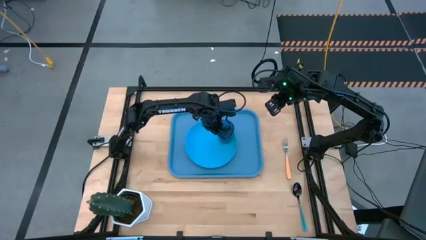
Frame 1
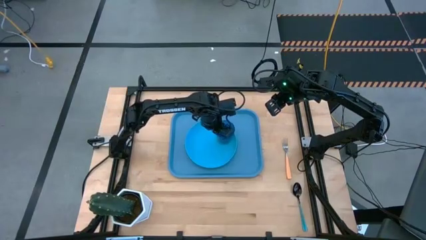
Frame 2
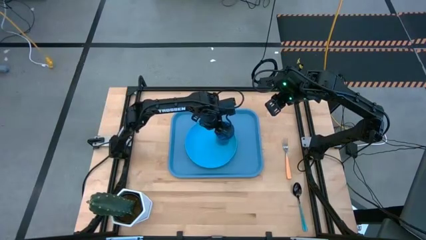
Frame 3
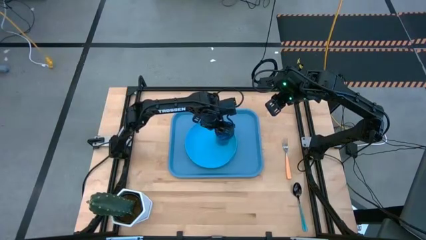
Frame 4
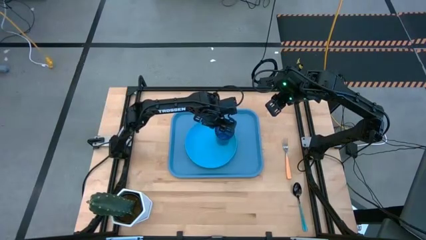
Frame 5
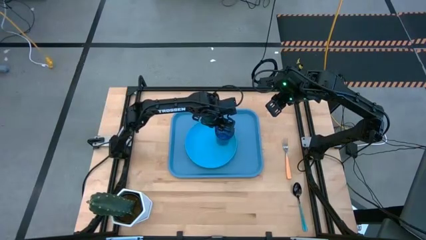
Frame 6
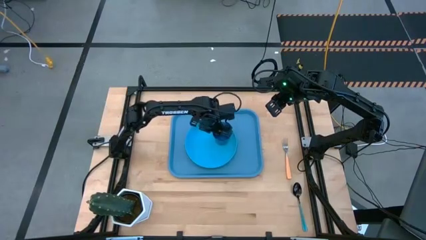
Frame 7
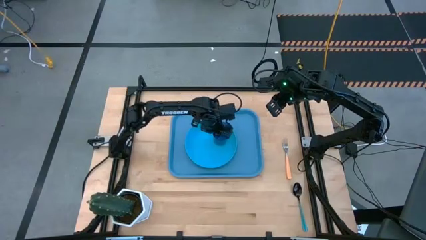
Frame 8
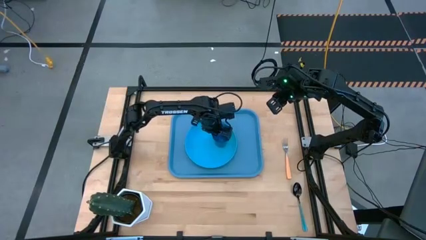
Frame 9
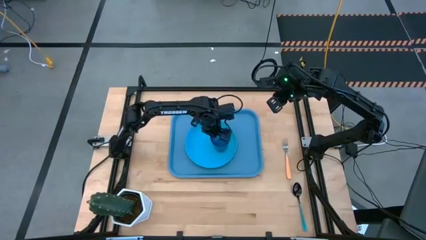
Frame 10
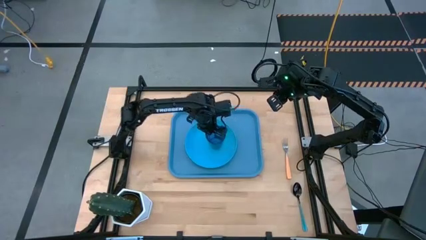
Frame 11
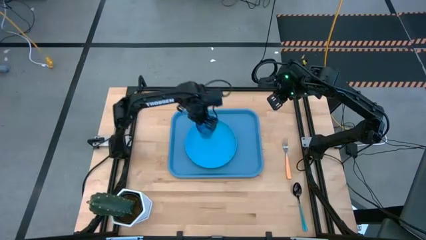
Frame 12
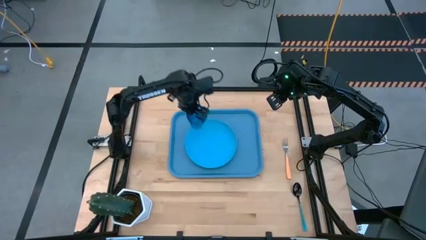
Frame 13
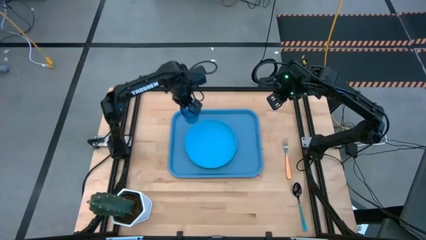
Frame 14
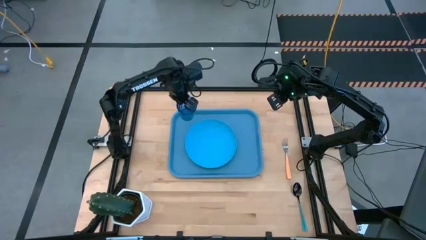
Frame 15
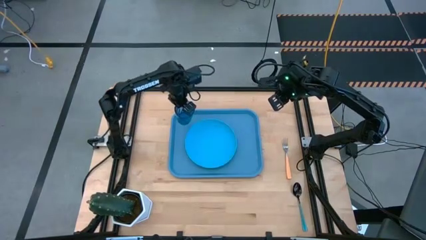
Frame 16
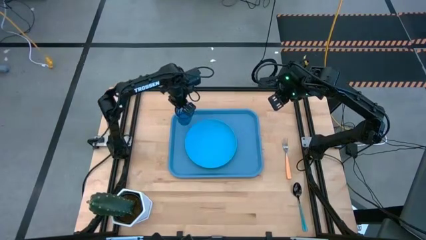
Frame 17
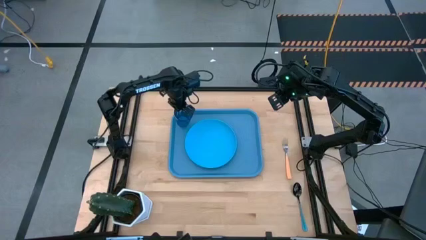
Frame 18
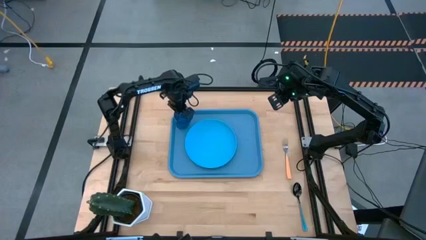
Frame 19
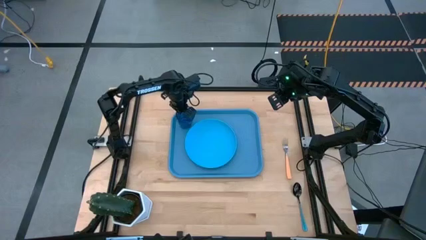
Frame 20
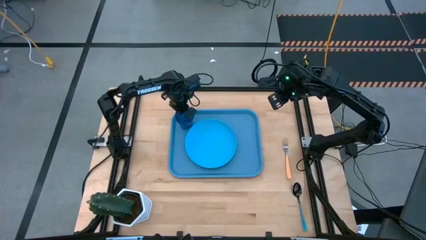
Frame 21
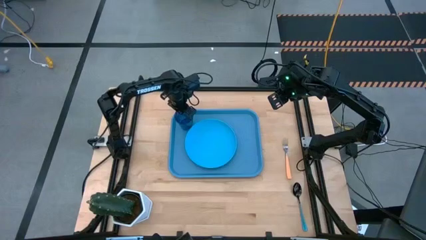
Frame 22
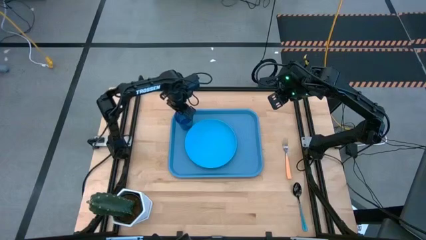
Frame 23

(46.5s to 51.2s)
Task: Pick and place plate/cup/fork/spoon on tray
Put the blue glass on the blue serving tray to the top left of the blue plate

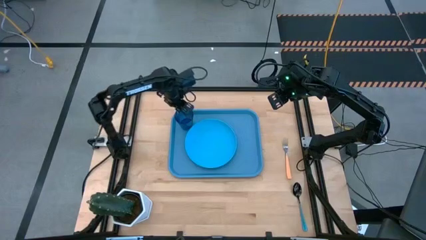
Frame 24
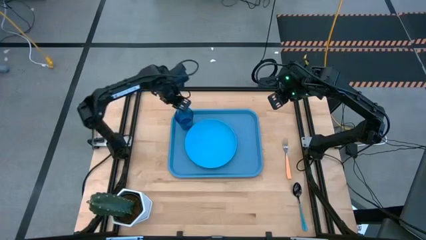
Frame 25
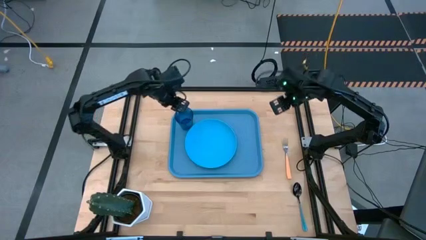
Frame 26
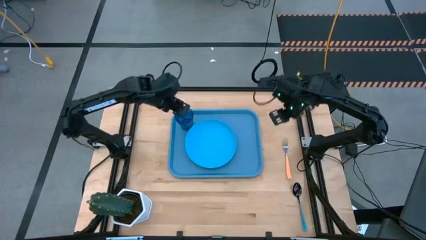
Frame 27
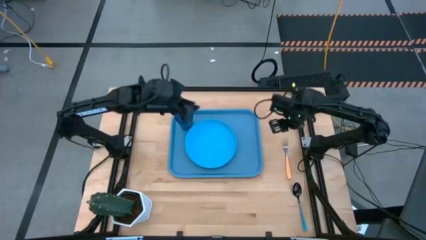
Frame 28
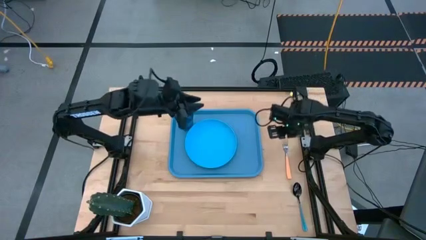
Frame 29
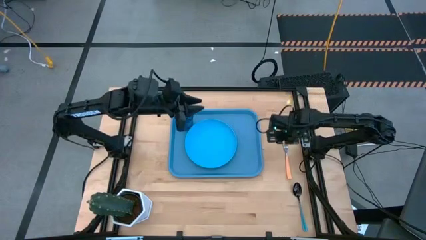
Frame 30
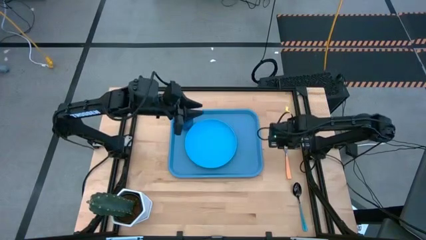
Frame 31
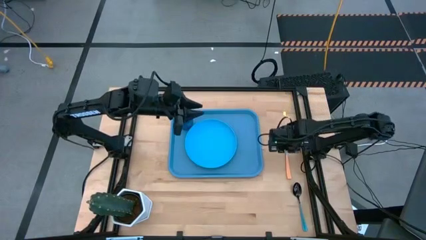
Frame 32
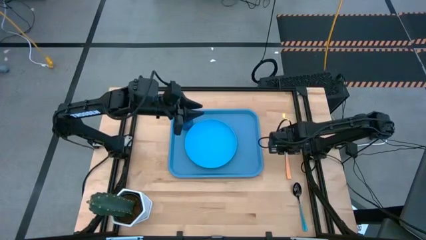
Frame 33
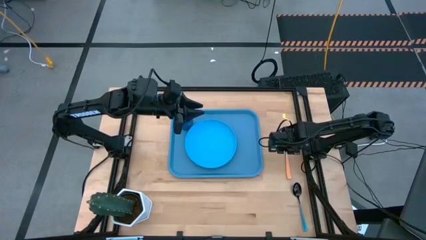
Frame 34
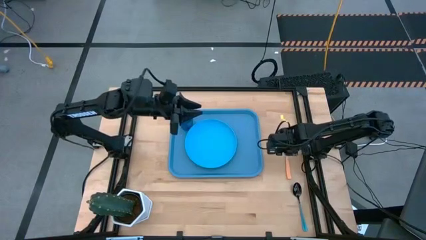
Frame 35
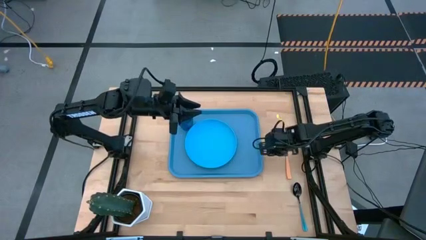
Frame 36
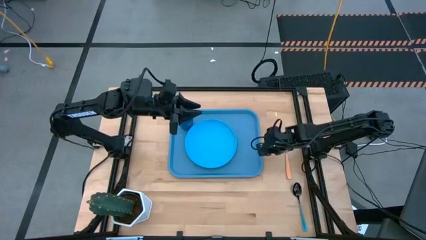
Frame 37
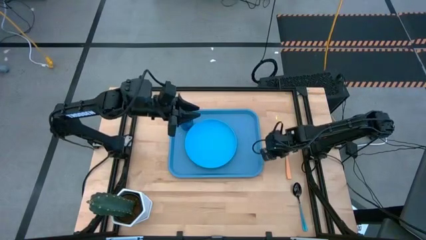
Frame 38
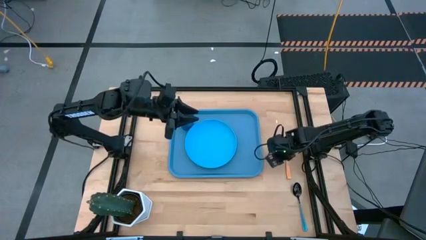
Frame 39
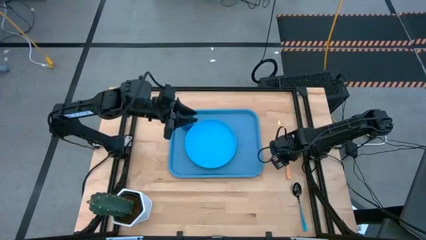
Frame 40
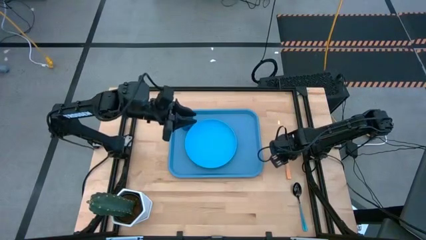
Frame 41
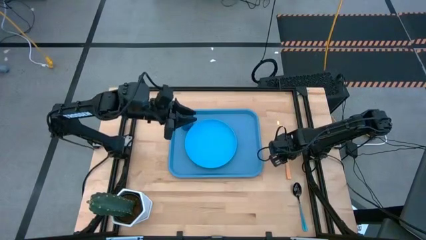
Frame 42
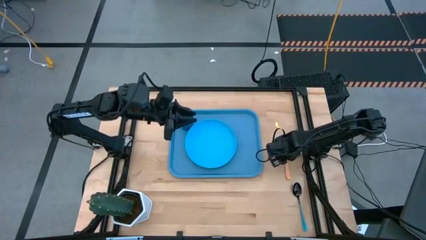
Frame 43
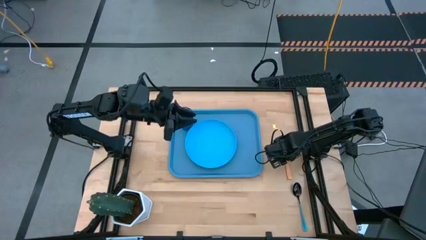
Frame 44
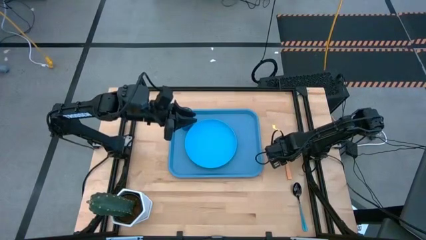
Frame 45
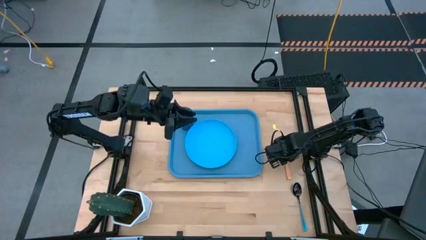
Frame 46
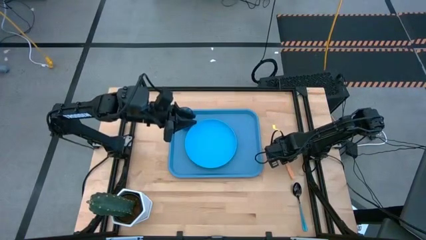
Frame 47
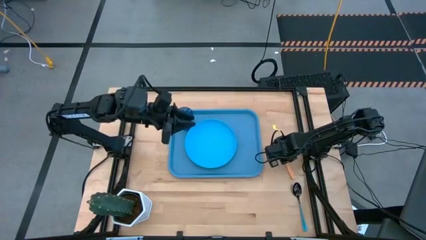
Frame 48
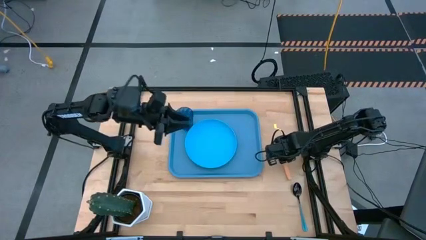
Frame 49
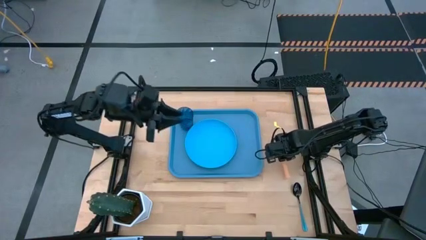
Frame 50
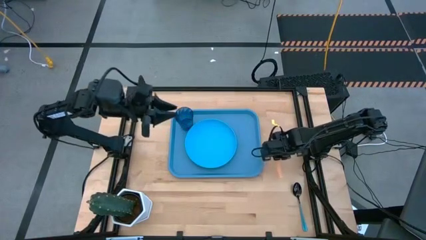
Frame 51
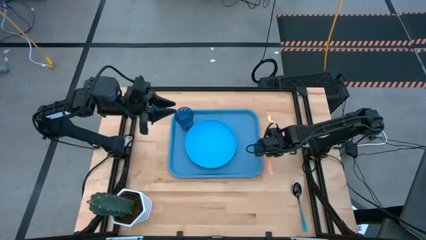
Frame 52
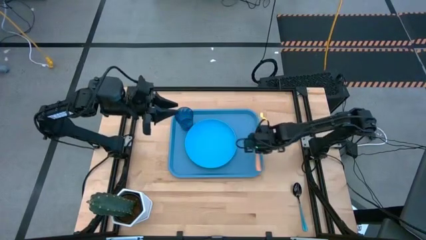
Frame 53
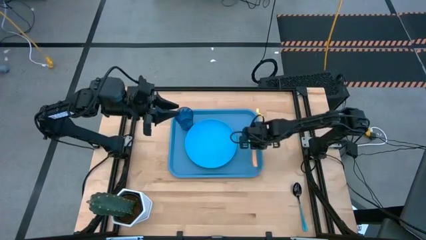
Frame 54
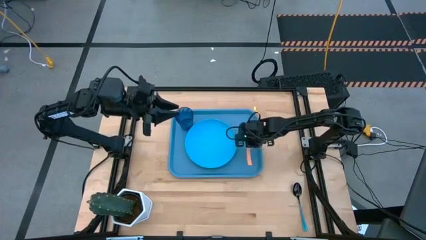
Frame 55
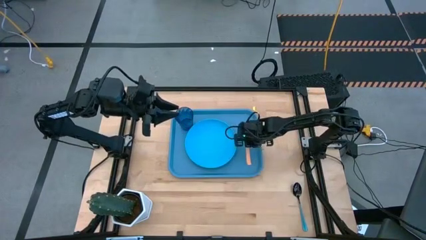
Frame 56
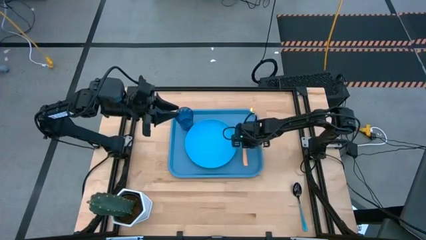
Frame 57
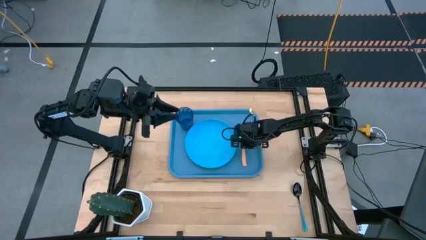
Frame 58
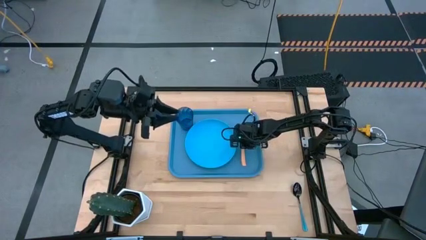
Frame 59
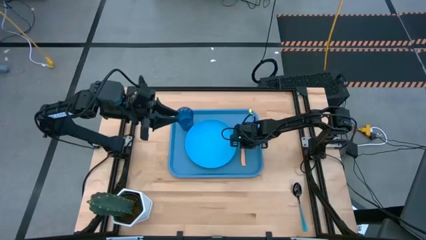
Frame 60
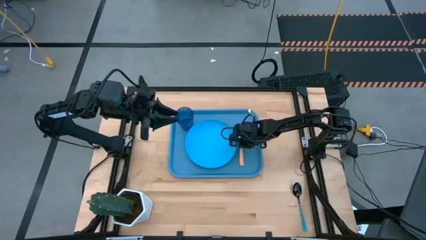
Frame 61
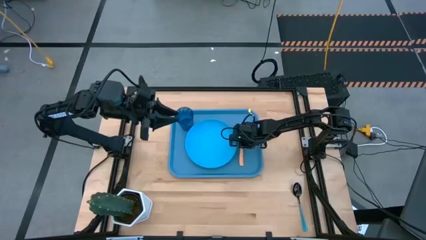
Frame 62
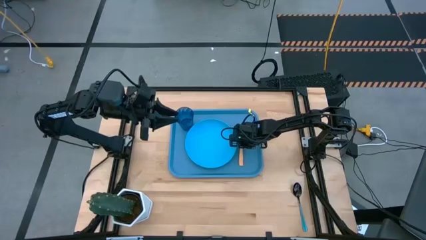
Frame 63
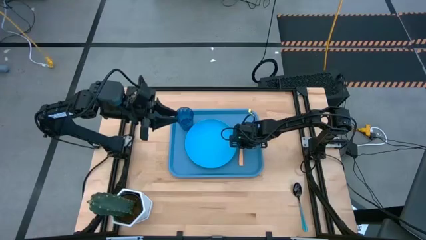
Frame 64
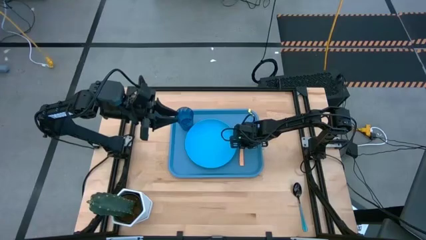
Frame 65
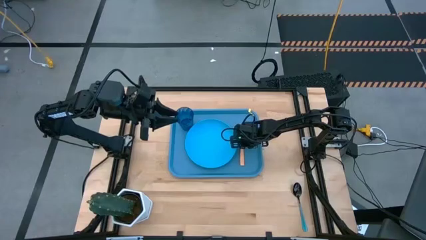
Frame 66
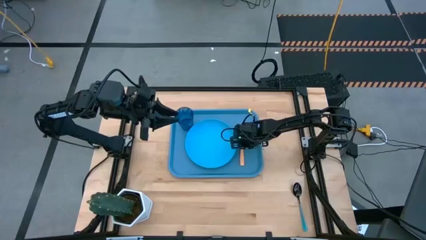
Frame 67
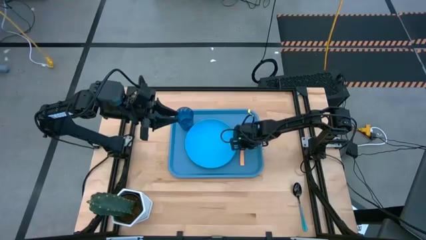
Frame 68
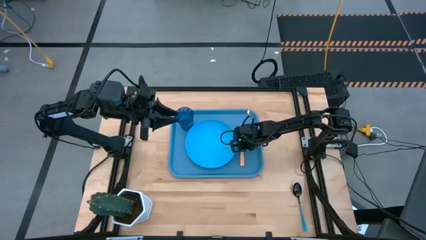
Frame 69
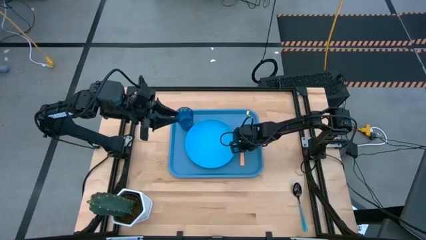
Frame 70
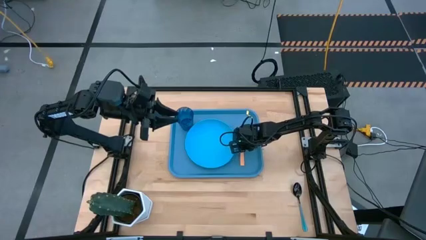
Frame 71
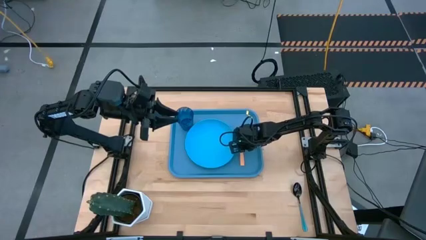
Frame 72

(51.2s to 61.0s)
Put the orange fork on the blue serving tray to the right of the blue plate
